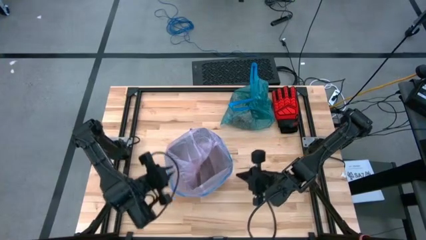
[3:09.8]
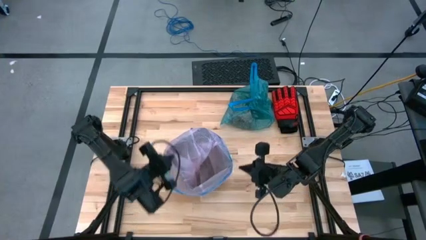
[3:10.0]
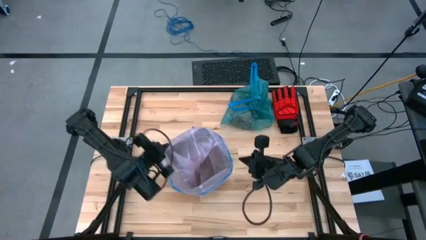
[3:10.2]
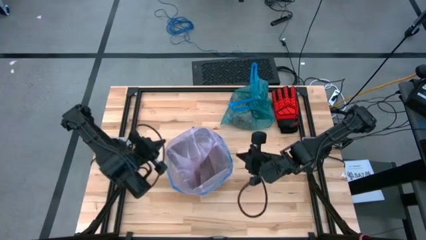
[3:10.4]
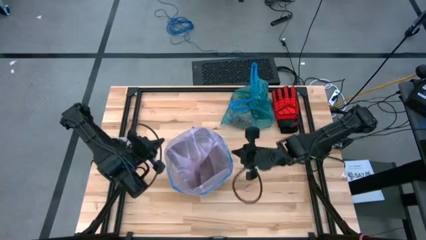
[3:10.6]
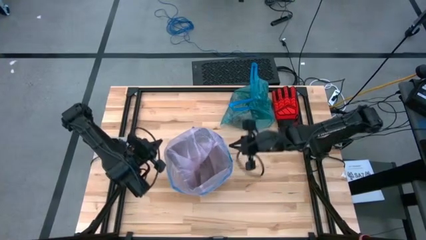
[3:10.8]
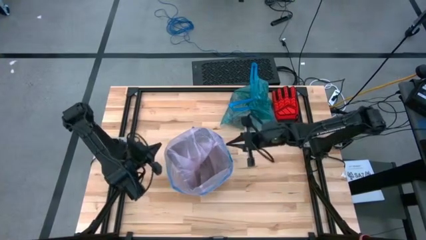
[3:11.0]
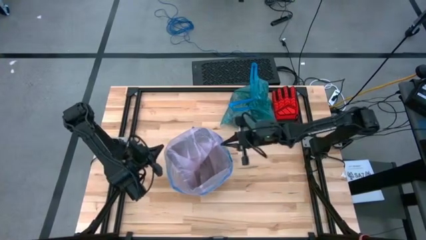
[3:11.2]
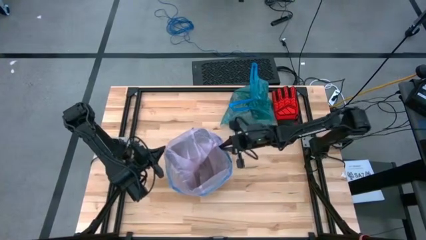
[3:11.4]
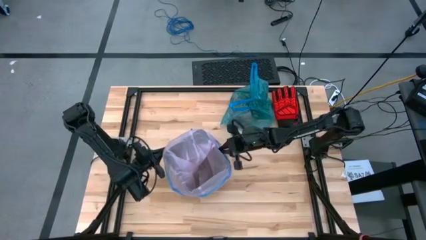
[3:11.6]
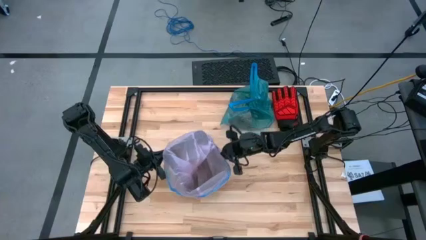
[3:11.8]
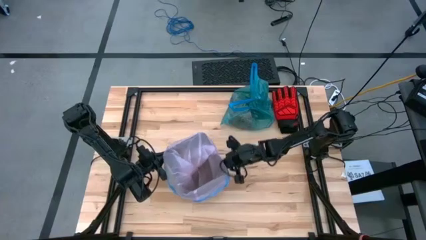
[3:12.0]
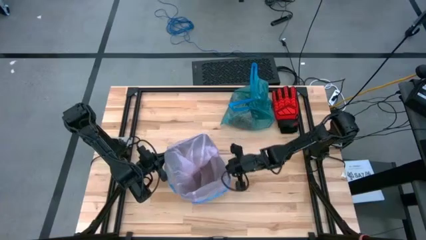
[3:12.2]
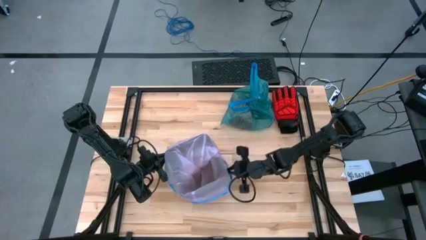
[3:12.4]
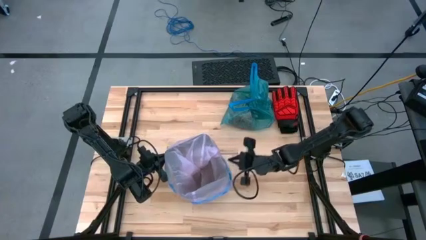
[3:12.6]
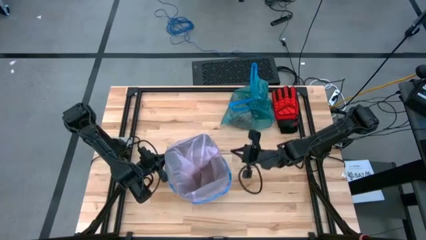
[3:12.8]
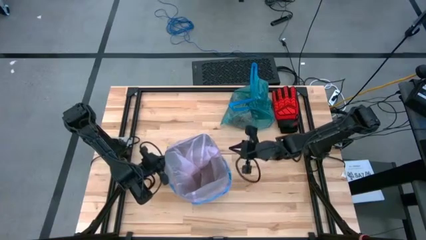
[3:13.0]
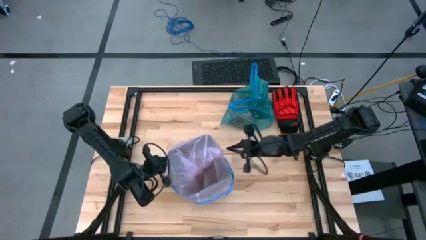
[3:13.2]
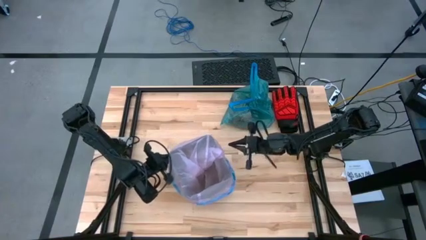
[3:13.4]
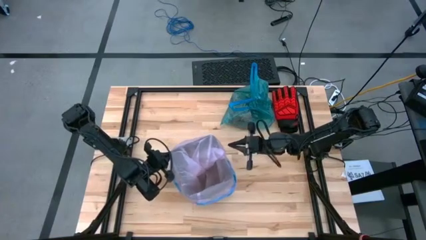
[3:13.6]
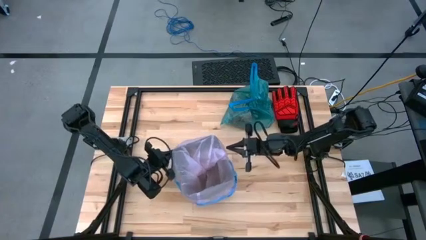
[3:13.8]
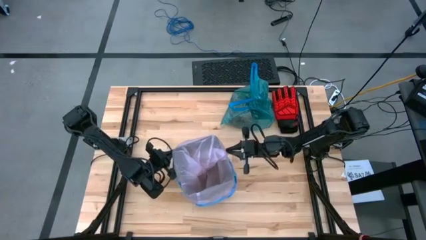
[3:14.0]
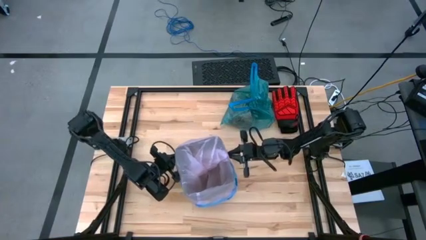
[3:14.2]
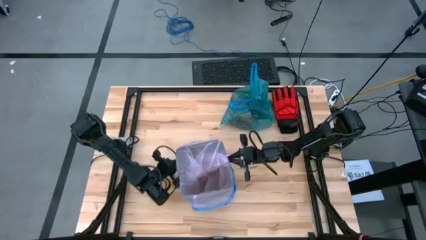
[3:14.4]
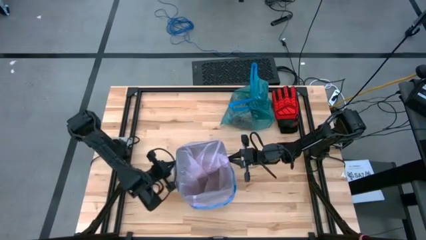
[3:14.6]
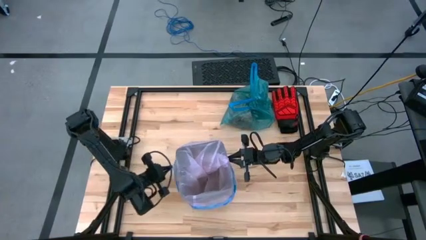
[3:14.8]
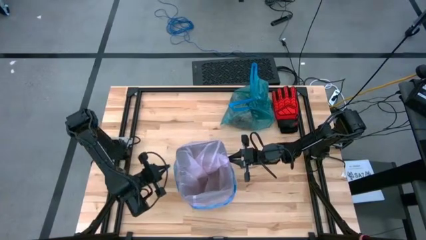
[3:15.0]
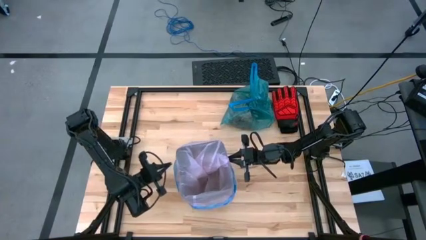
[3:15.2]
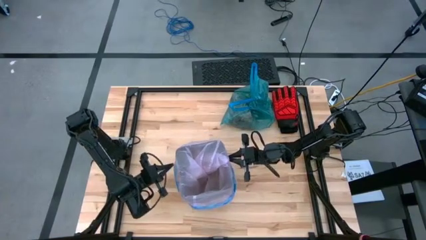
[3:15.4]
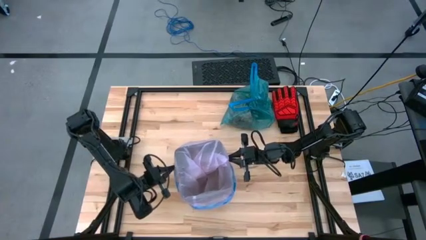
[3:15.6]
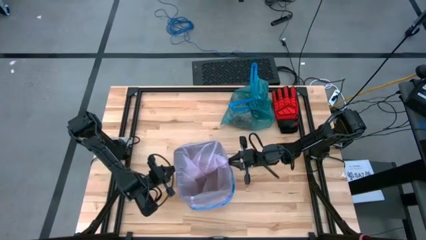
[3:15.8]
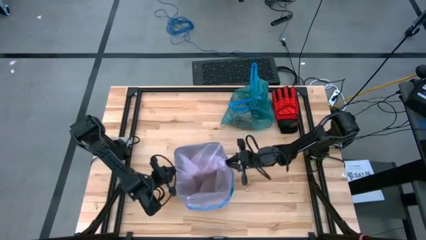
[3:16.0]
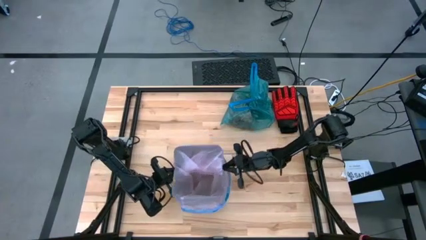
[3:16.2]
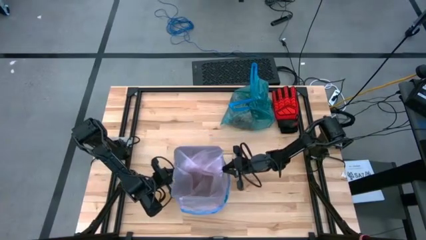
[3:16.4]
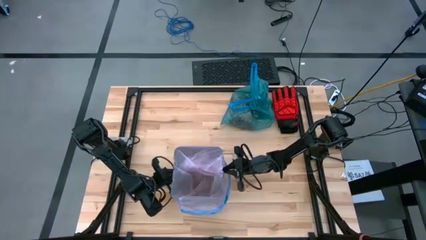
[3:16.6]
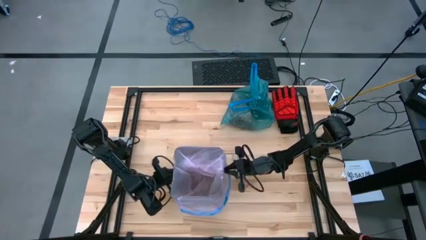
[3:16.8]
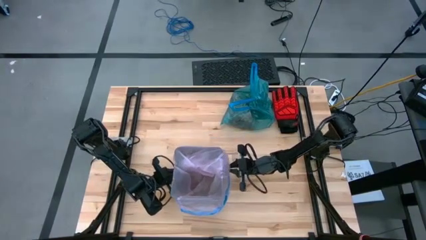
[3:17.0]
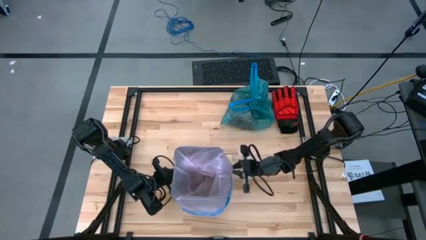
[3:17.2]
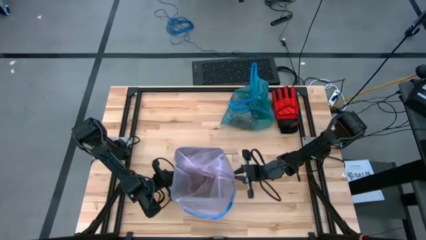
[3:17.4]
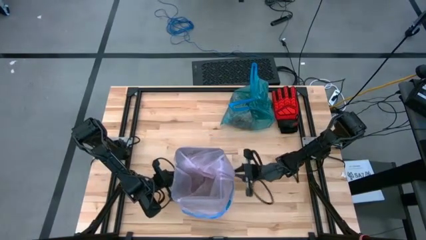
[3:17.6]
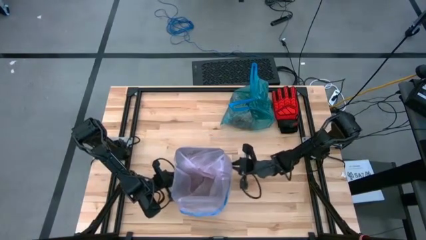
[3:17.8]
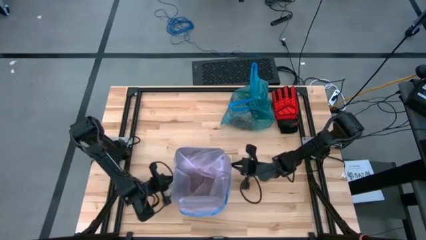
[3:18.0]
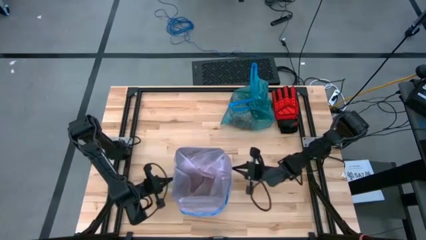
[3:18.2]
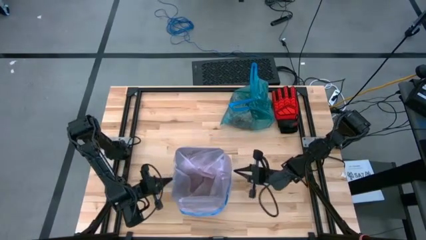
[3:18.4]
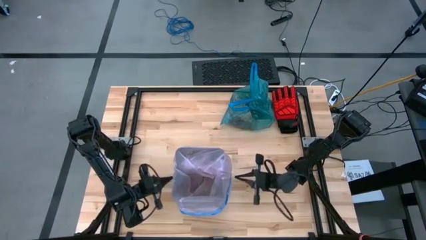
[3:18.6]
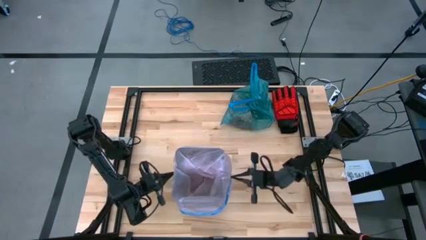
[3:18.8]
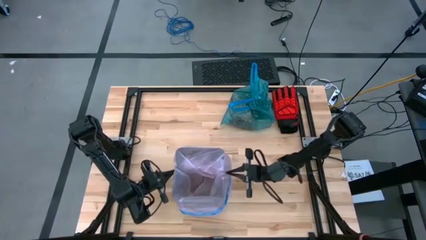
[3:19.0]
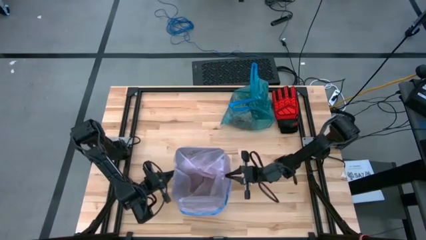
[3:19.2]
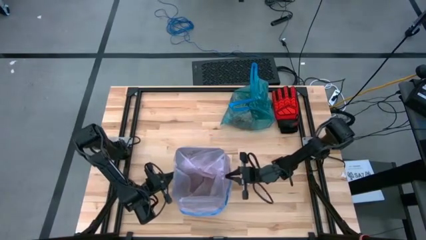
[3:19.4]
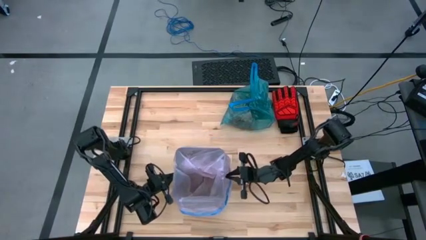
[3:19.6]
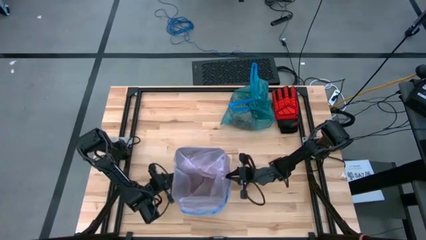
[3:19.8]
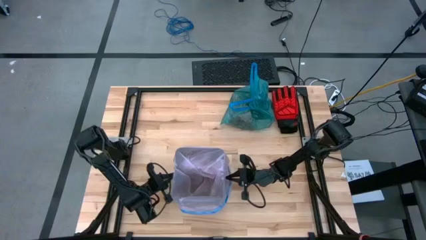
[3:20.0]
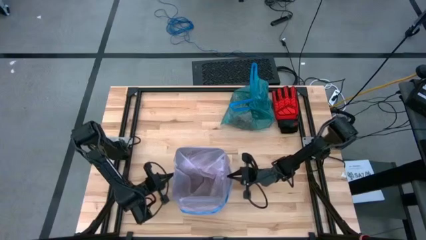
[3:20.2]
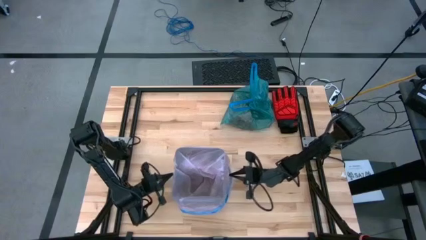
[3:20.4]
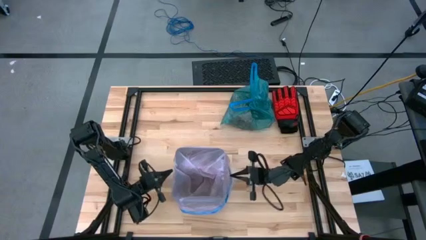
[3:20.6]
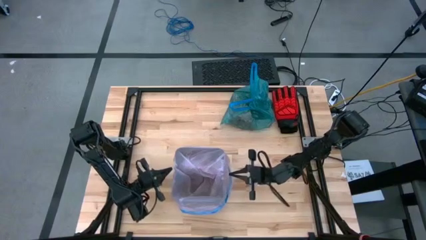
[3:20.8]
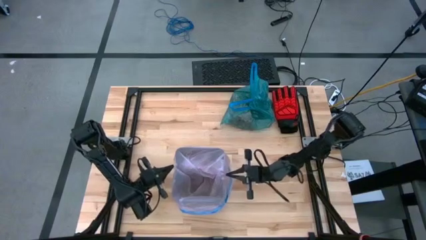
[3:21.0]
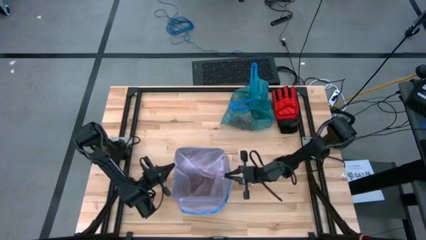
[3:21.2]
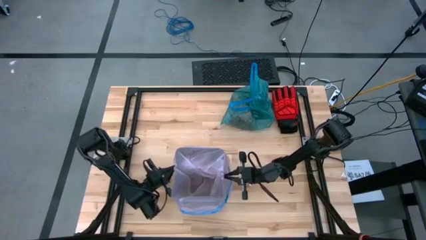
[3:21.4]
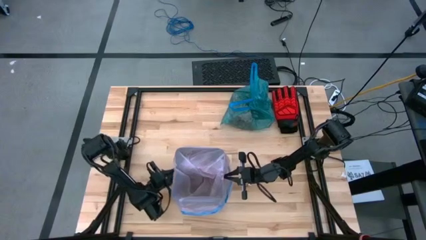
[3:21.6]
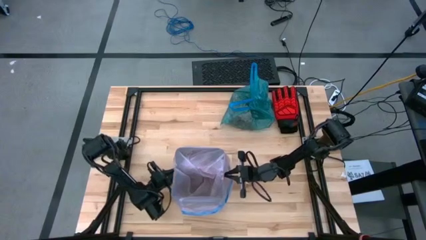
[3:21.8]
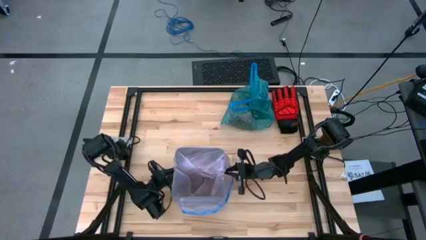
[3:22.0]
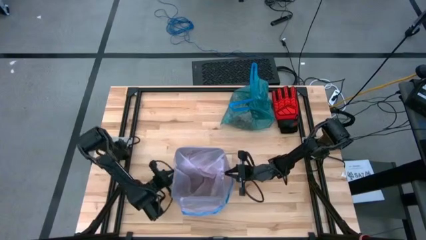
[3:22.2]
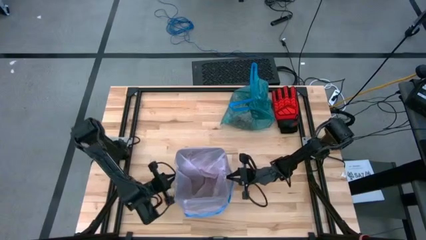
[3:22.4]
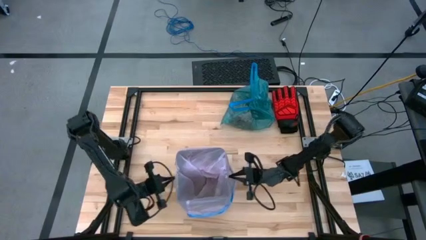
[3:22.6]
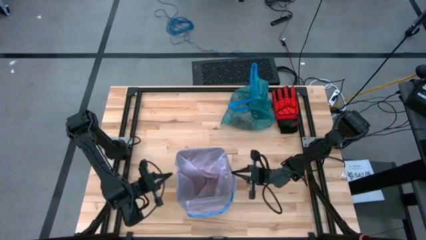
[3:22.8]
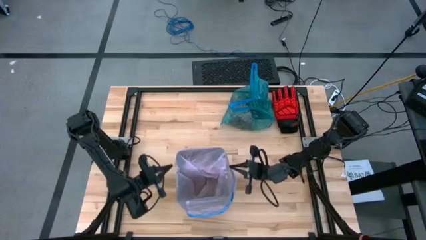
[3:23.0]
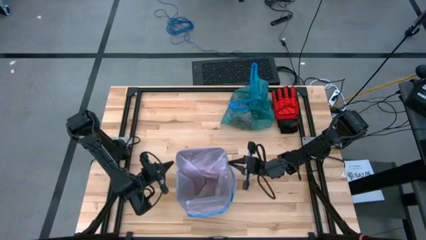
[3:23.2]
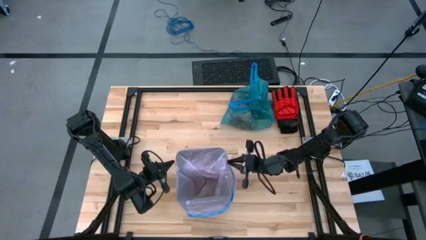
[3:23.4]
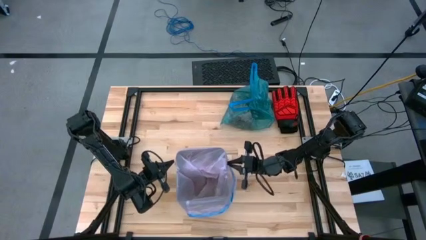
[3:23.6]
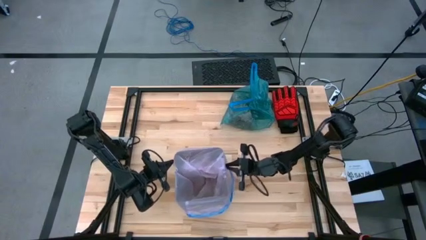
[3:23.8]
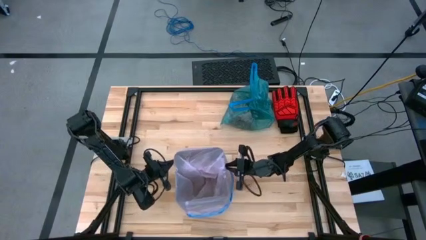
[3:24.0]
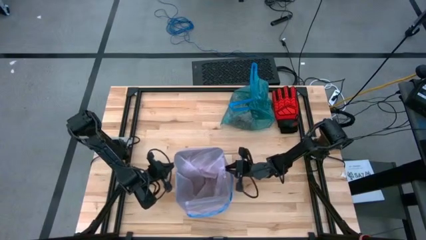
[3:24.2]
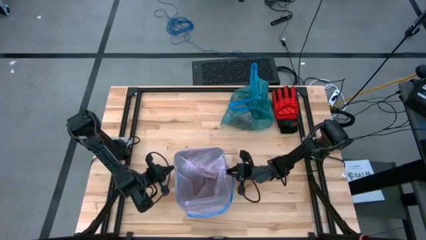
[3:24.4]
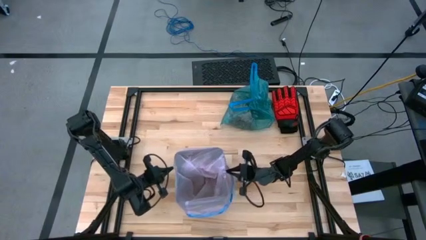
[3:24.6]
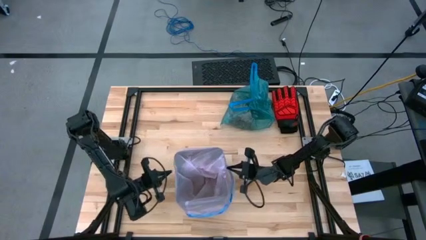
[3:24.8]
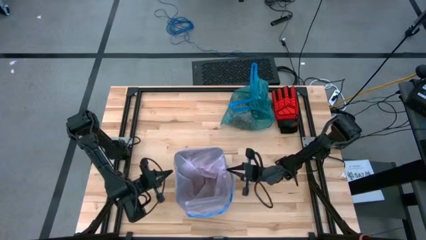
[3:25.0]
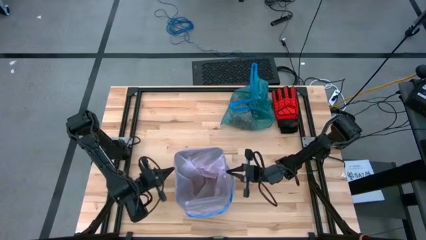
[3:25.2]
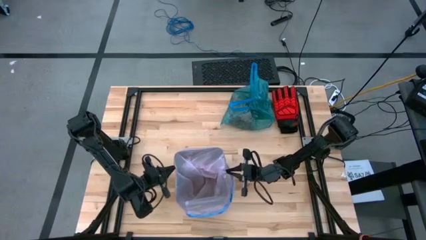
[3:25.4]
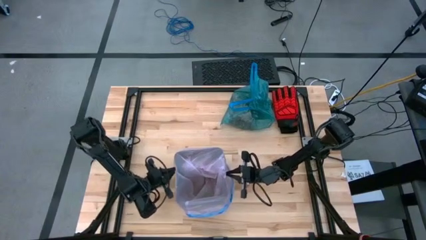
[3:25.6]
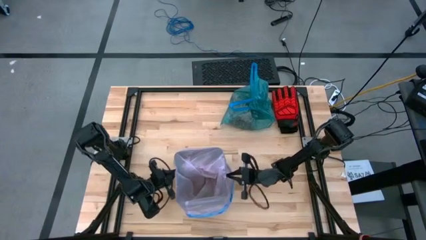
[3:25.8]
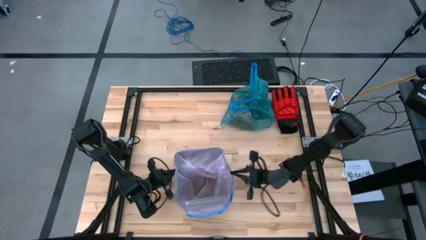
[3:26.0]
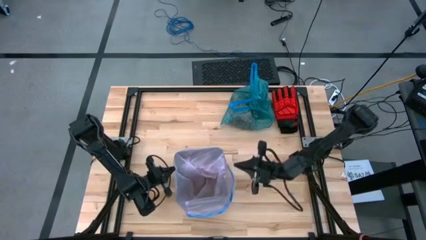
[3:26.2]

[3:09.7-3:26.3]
Task: place trash/remove bag and relplace
Insert the pink trash bag into the black trash bin
